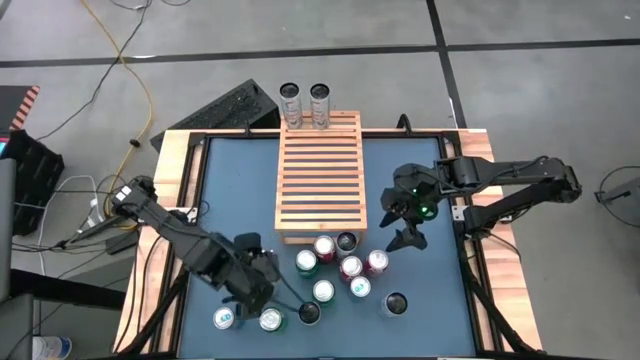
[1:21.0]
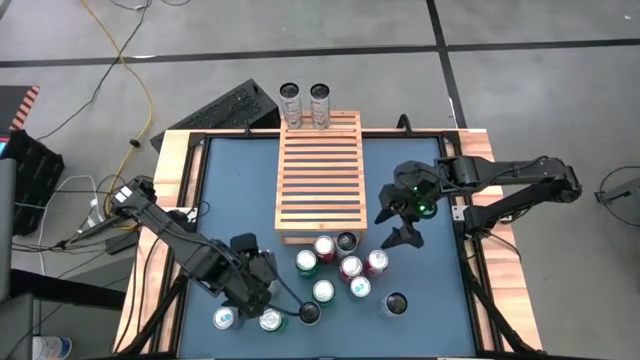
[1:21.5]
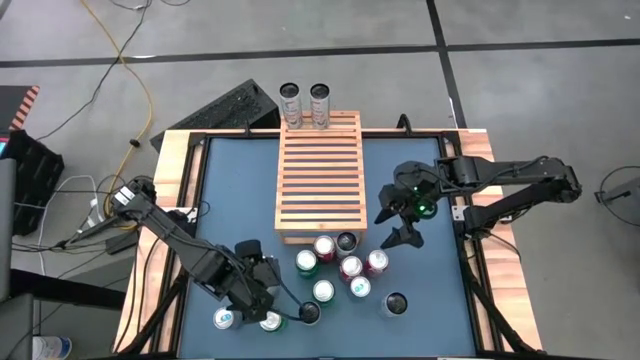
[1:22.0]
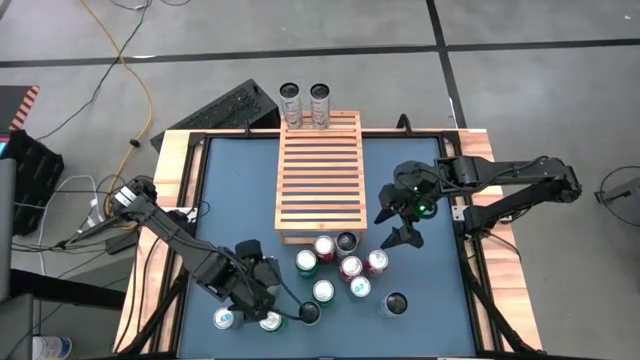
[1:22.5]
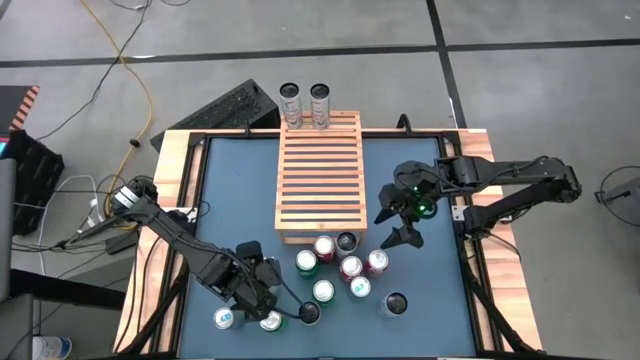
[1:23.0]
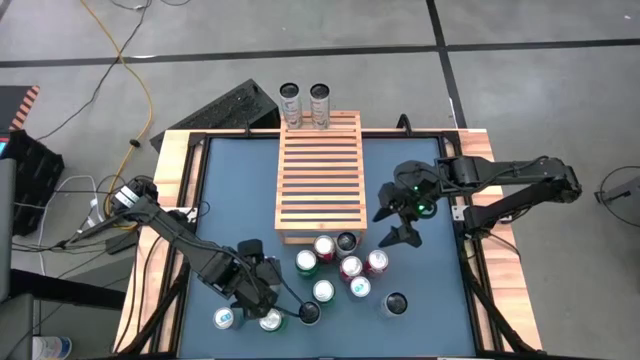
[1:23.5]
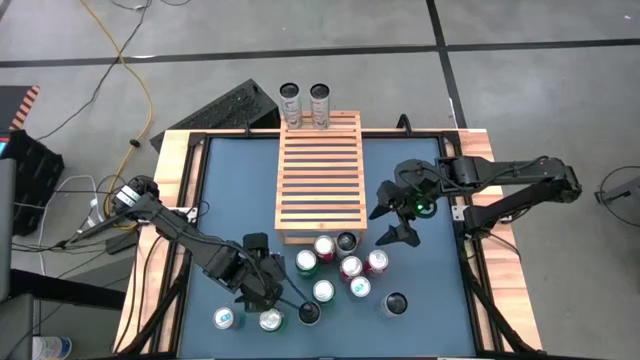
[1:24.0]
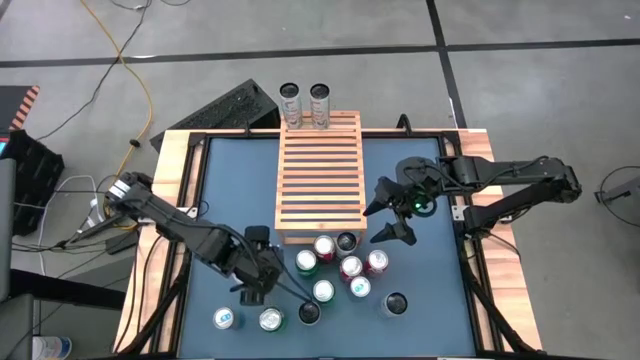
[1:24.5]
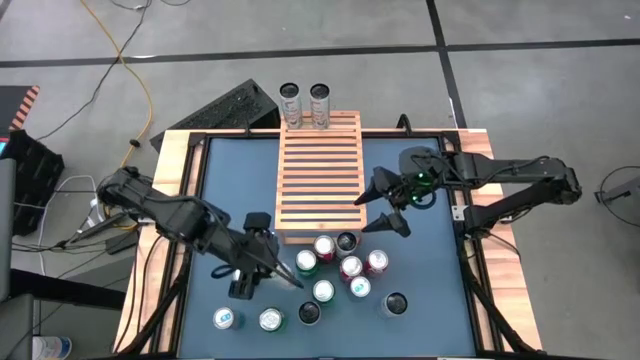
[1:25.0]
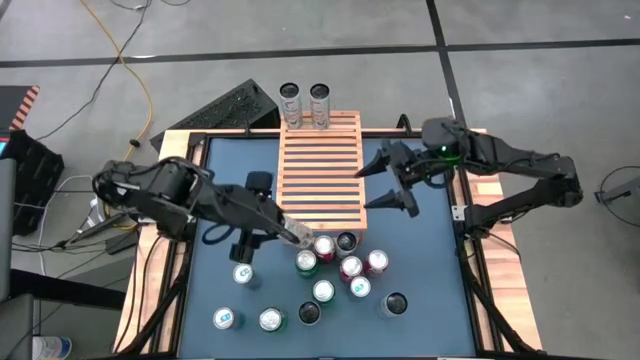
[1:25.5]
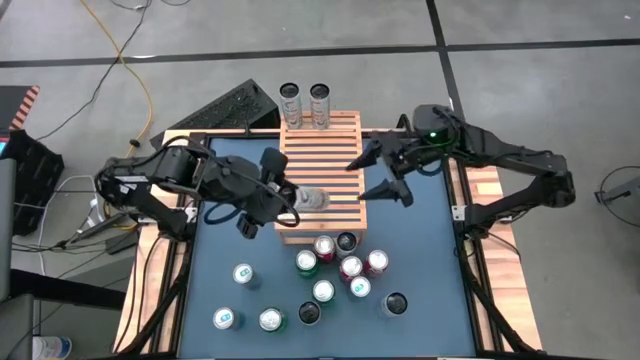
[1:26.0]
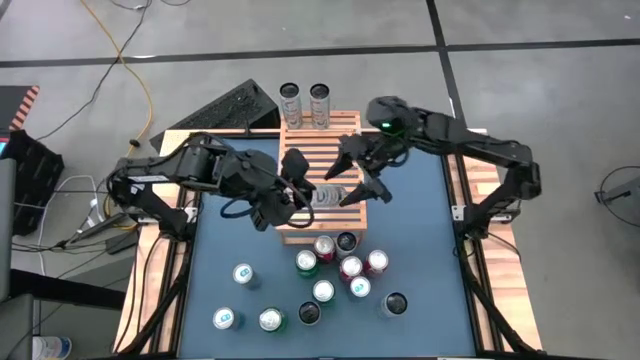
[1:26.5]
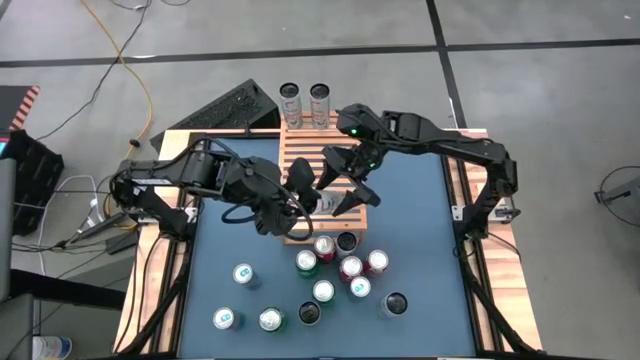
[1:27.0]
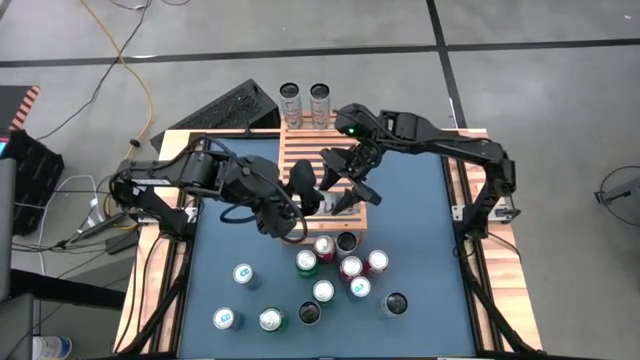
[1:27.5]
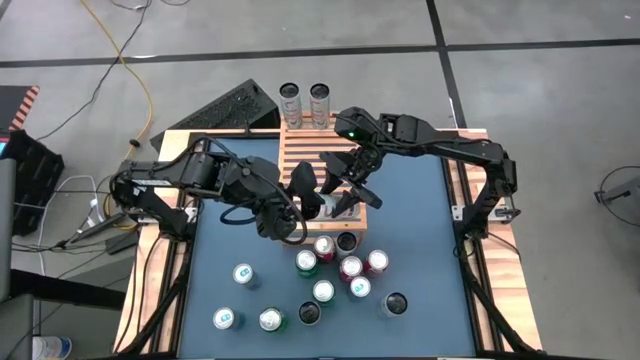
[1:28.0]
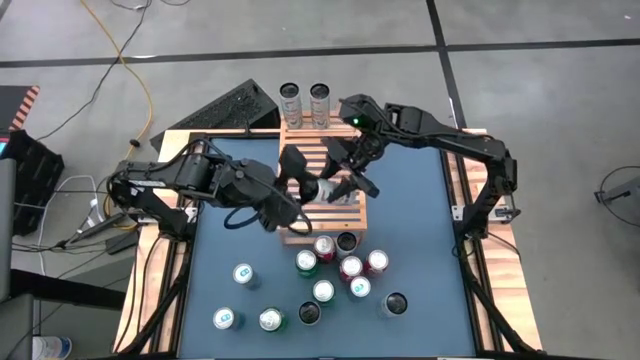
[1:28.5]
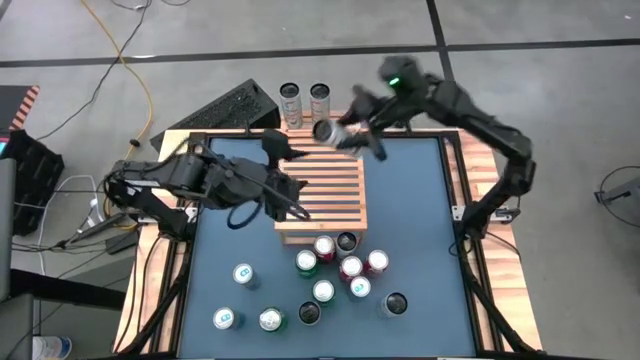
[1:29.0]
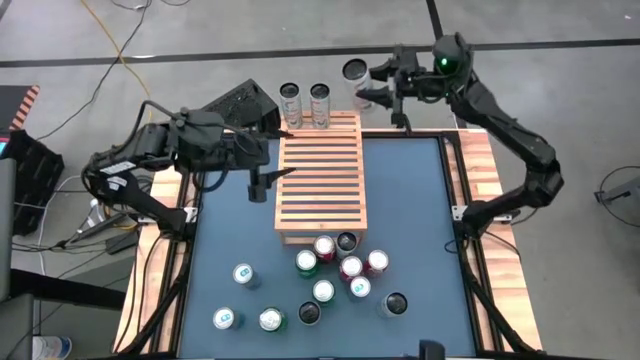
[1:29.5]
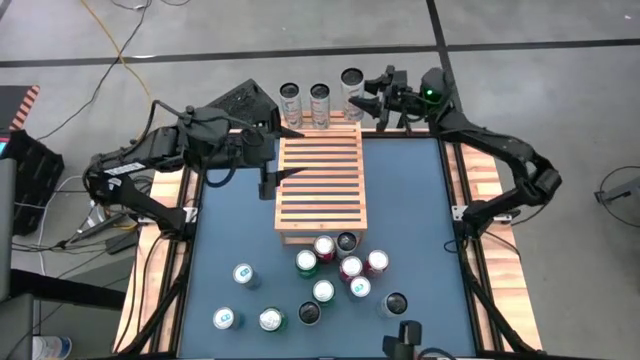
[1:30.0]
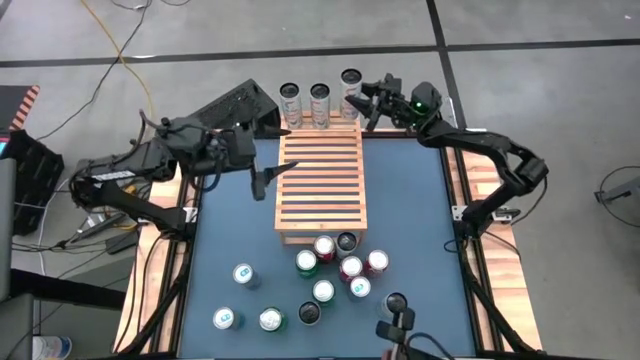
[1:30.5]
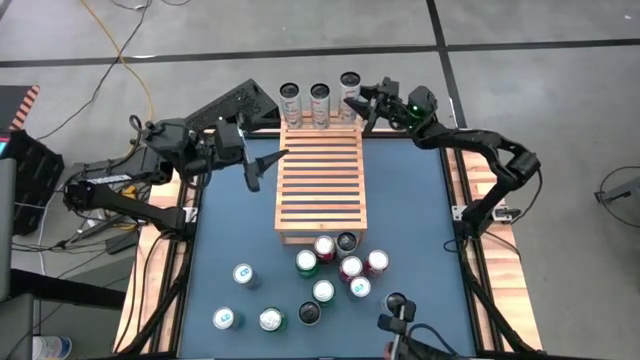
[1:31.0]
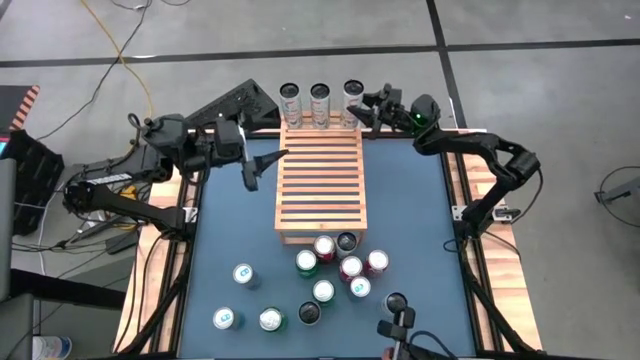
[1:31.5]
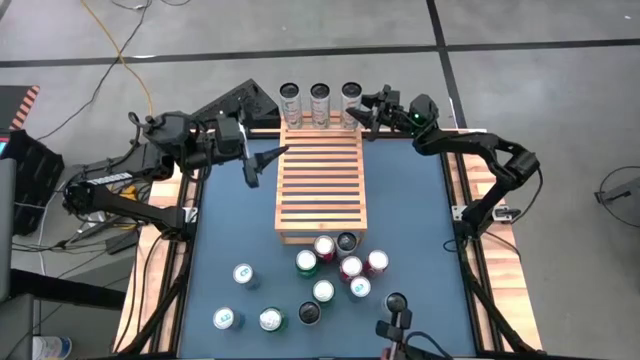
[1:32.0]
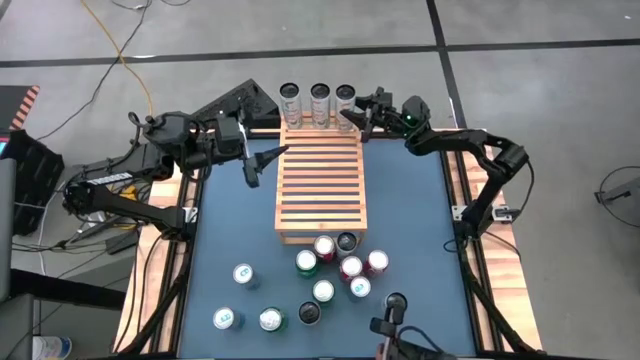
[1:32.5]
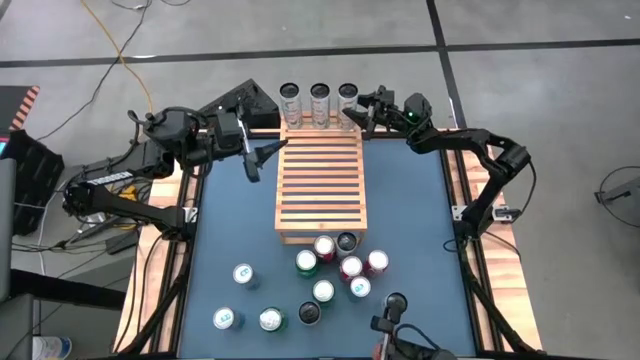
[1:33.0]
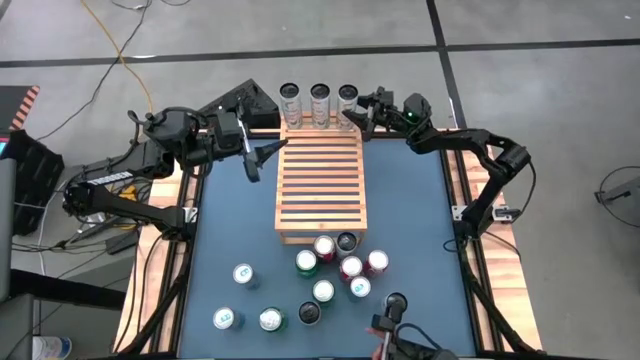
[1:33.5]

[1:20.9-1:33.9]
Task: Place canned beverage on shelf
Put the white yellow soda can on the shelf aligned with the other white yellow soda cans

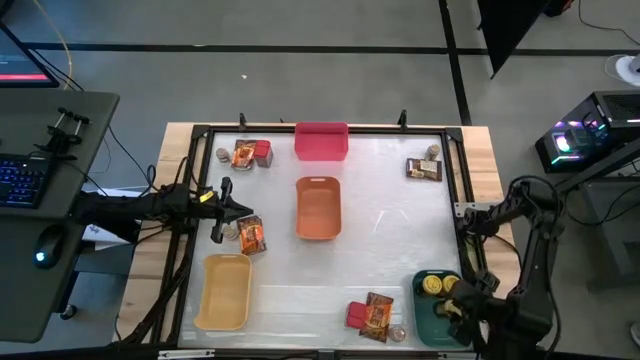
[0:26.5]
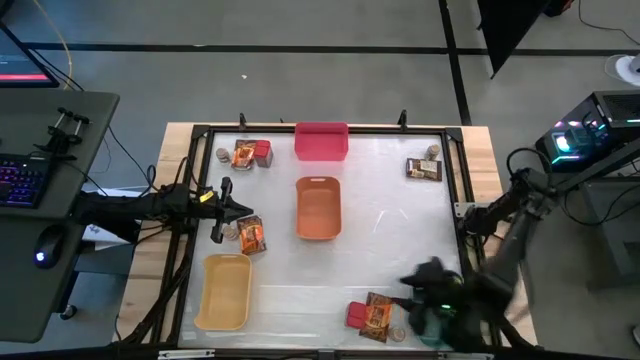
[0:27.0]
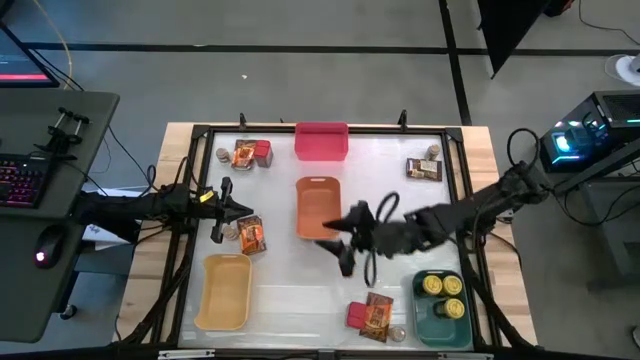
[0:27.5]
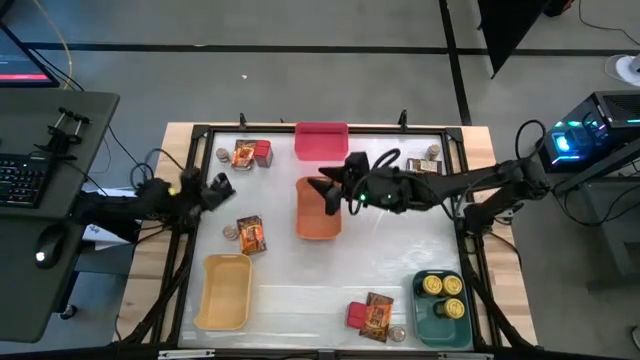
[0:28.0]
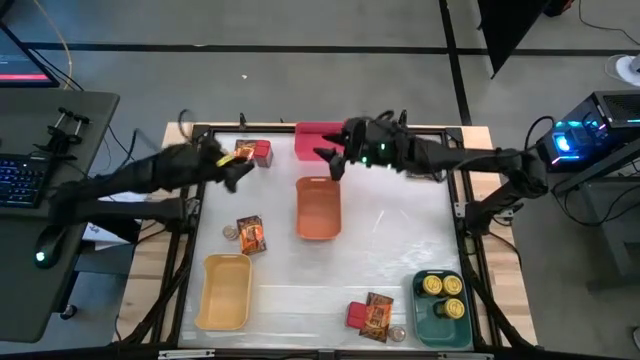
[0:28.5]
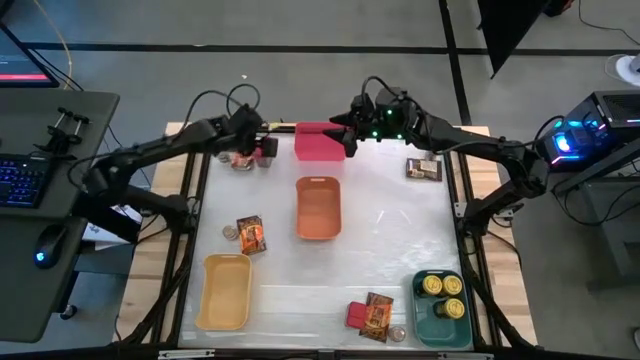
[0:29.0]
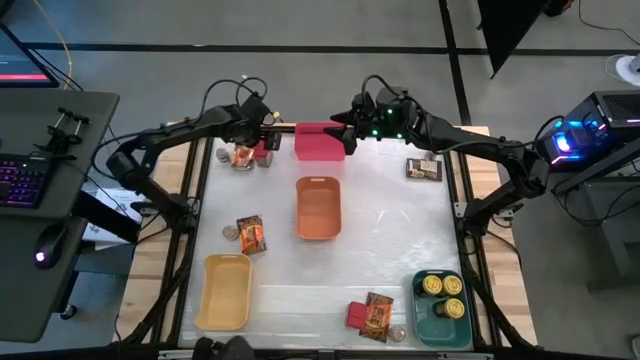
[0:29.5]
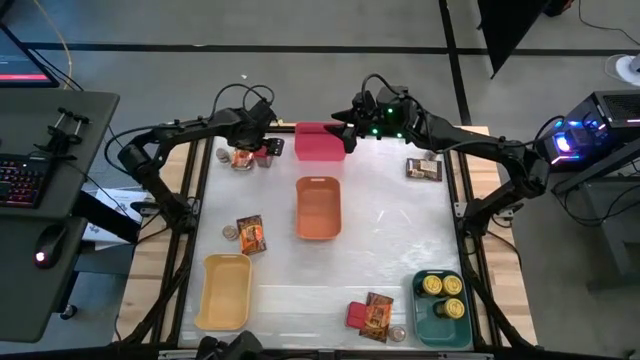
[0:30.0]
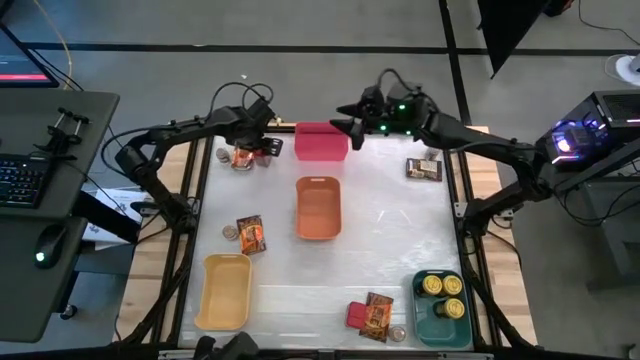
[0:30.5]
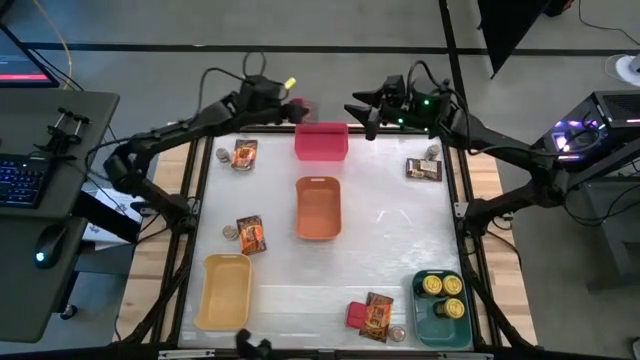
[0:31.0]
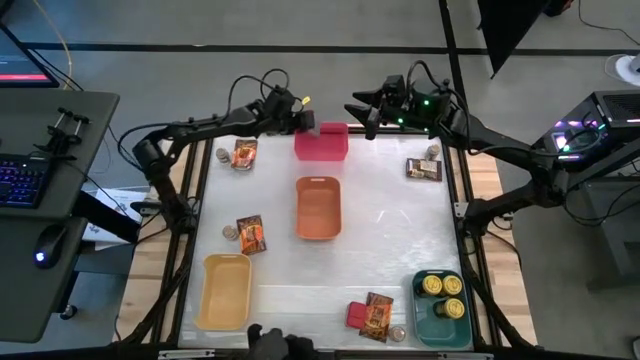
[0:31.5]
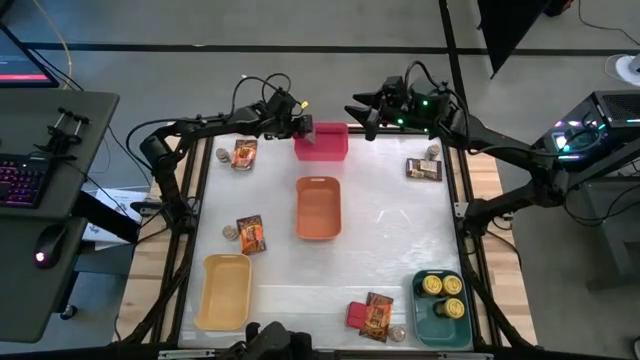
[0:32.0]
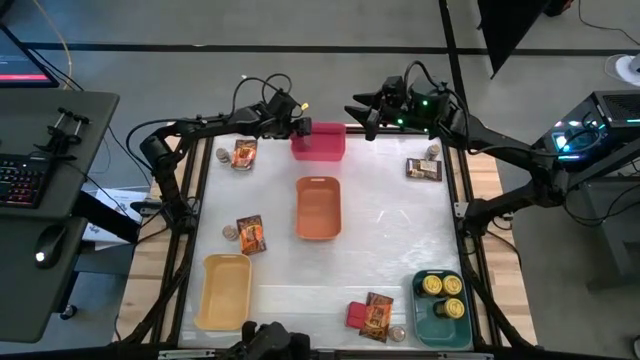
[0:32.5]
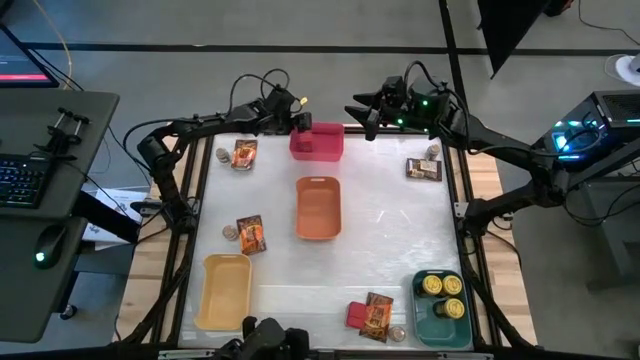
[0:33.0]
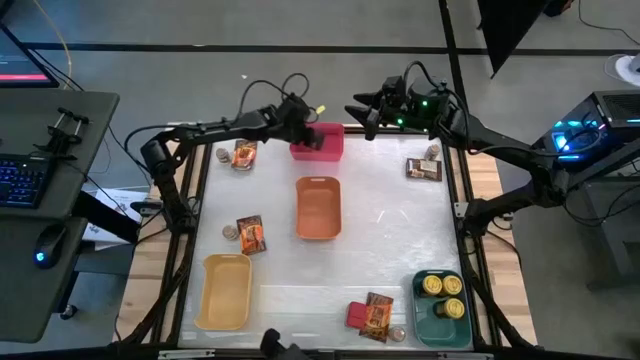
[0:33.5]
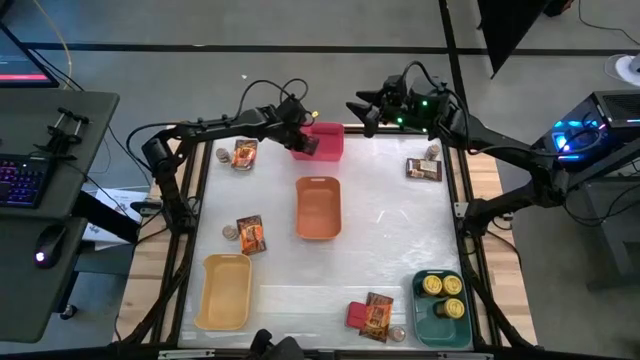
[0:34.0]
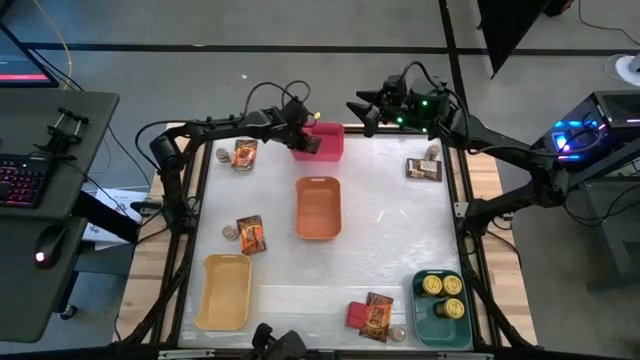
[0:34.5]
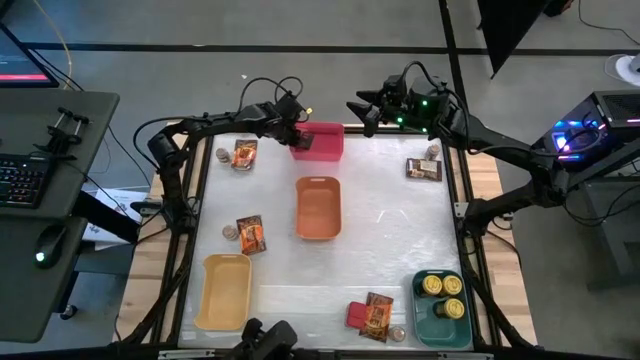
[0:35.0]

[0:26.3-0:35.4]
Task: Sort spices by type
Put the top red spice can into the red bin
